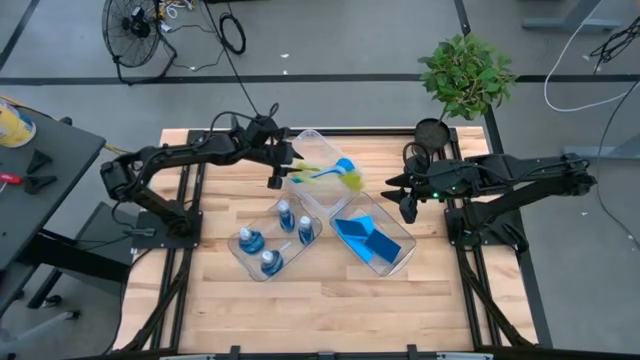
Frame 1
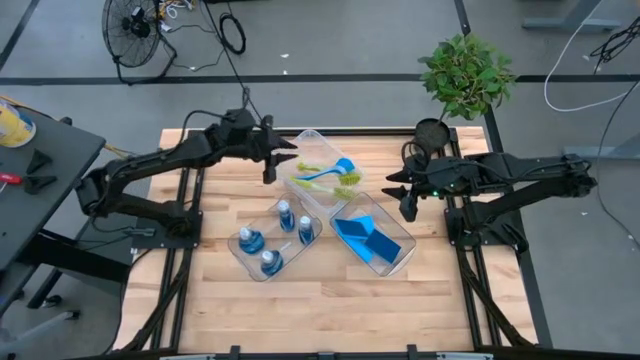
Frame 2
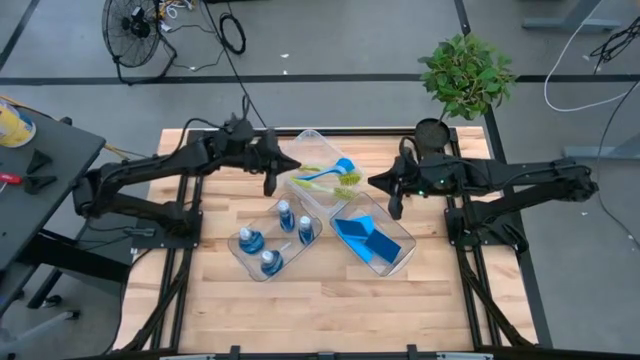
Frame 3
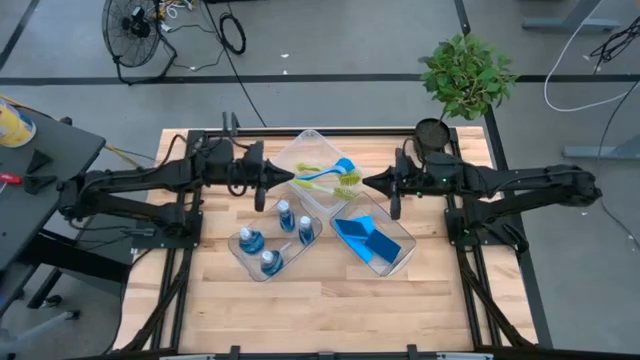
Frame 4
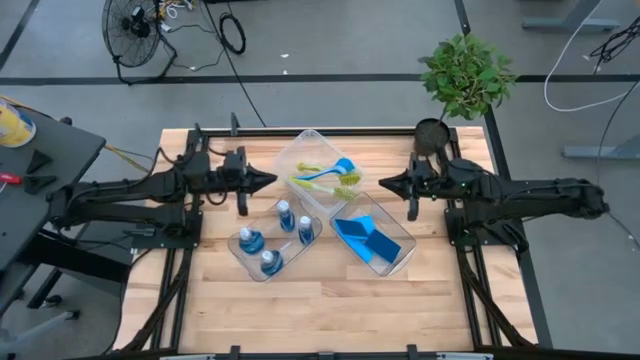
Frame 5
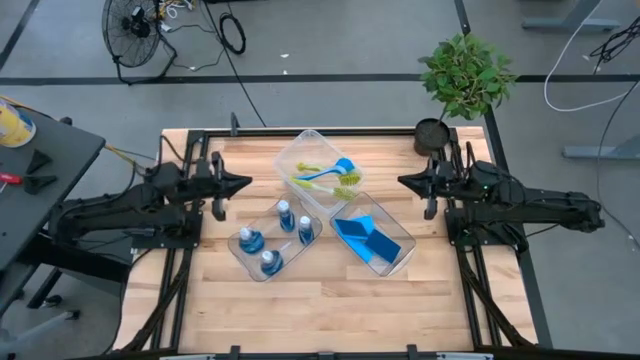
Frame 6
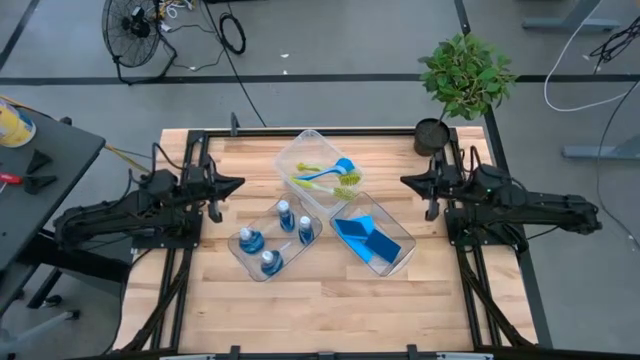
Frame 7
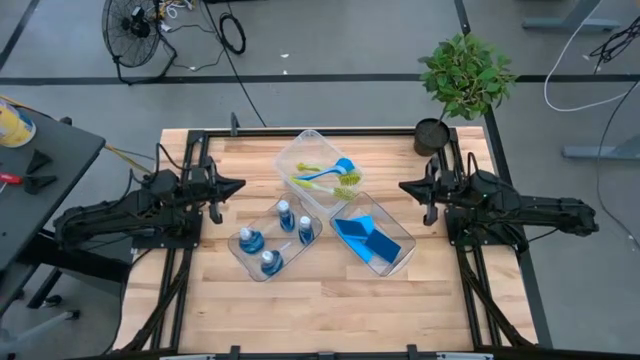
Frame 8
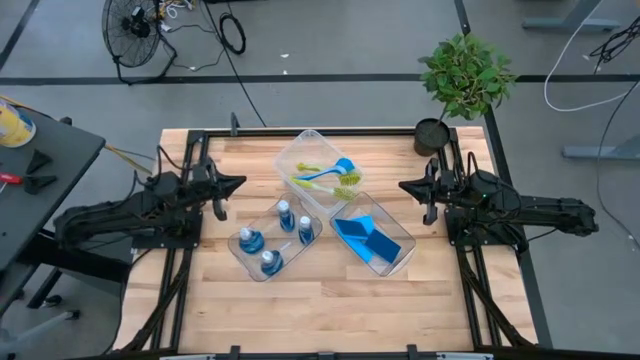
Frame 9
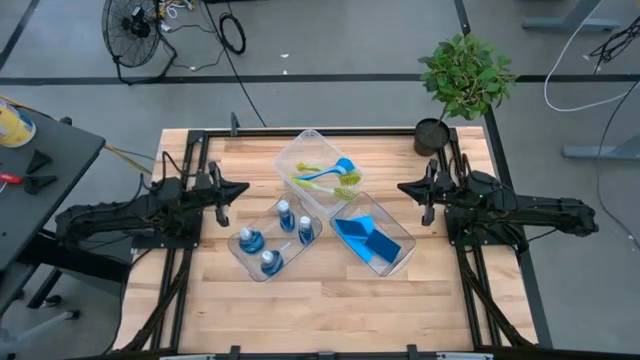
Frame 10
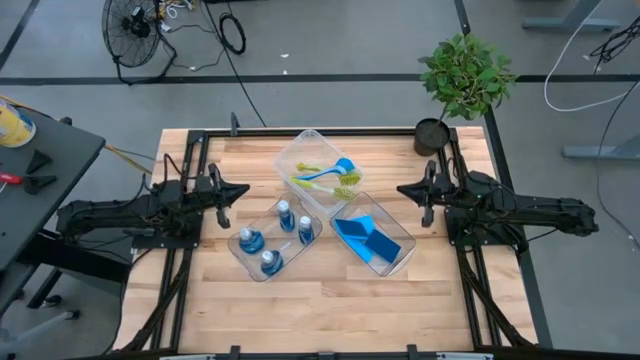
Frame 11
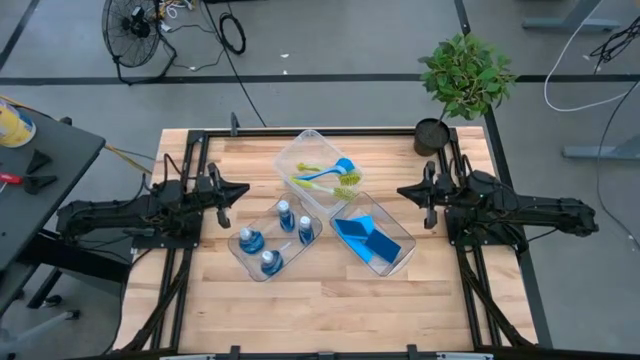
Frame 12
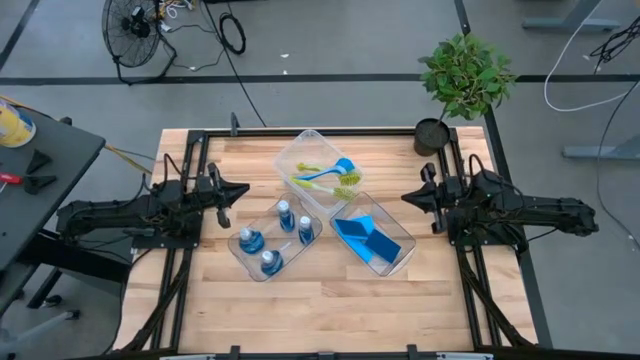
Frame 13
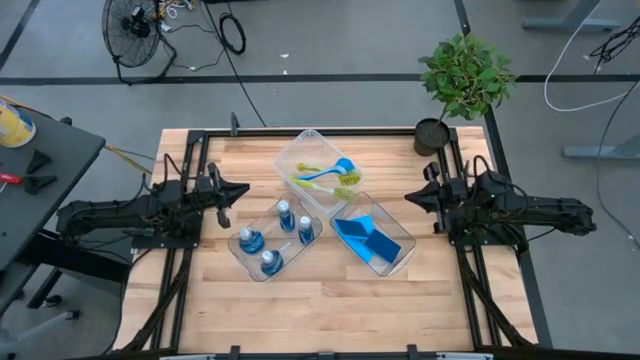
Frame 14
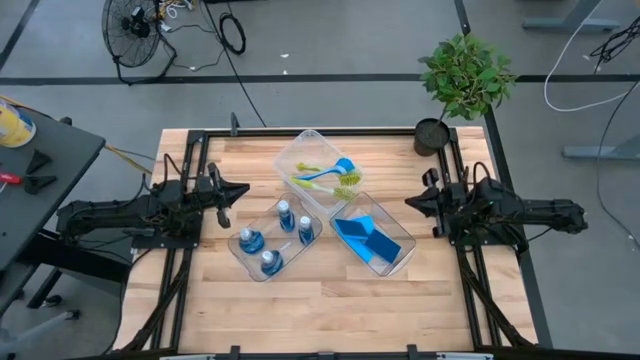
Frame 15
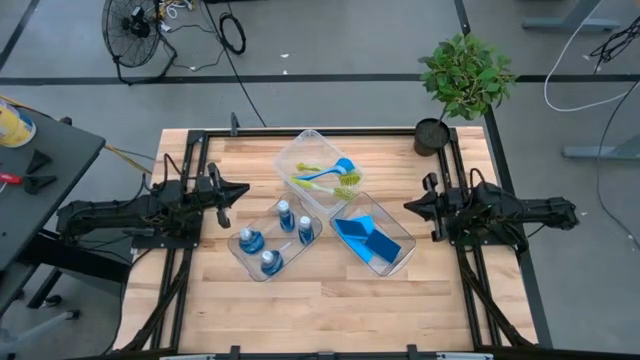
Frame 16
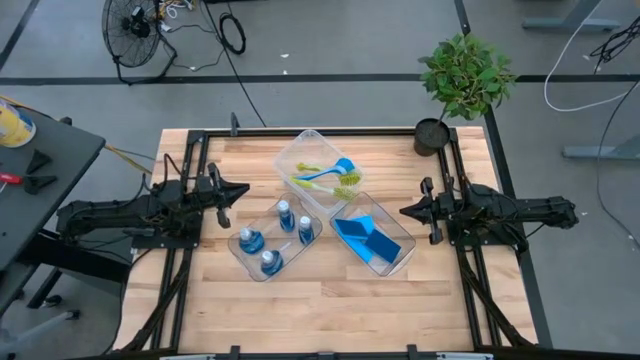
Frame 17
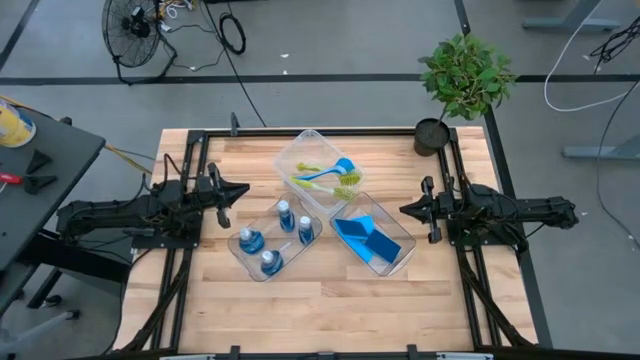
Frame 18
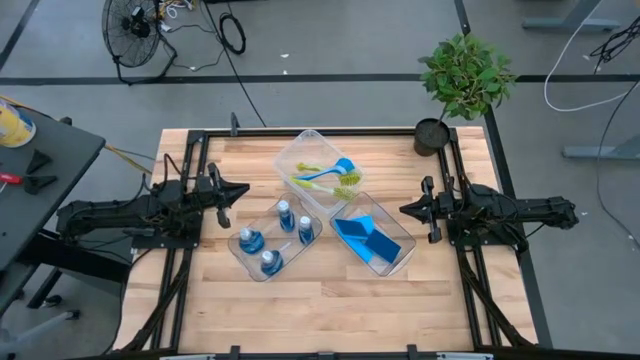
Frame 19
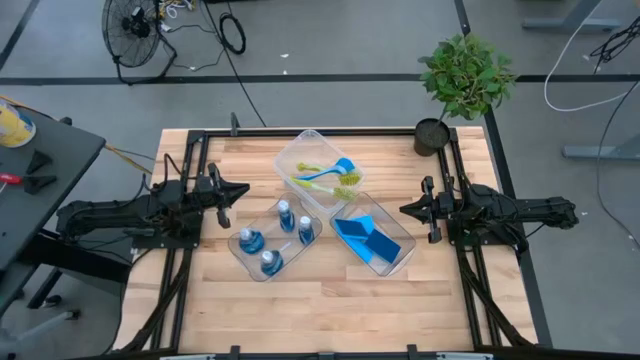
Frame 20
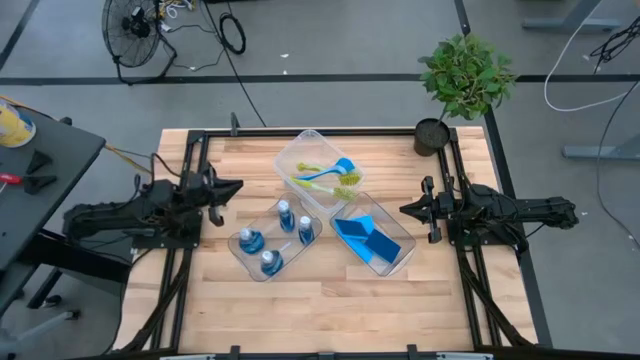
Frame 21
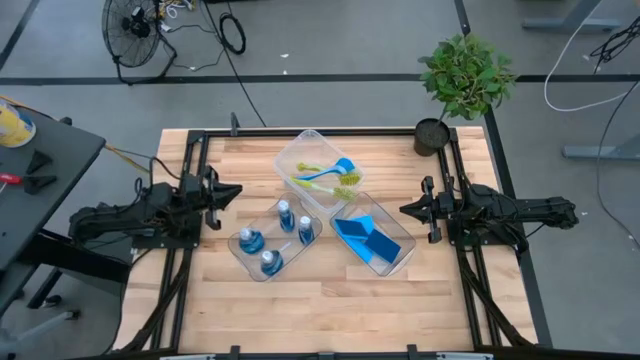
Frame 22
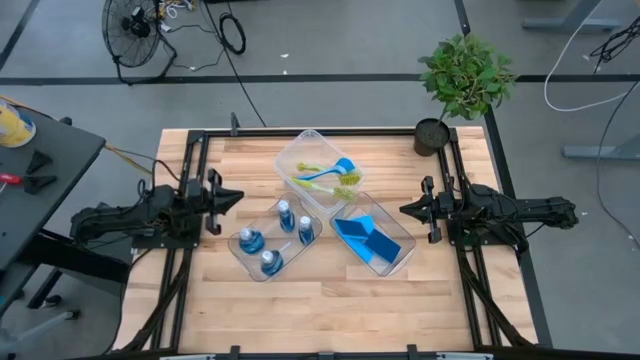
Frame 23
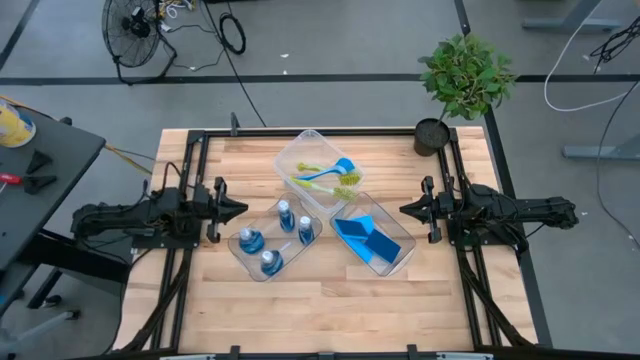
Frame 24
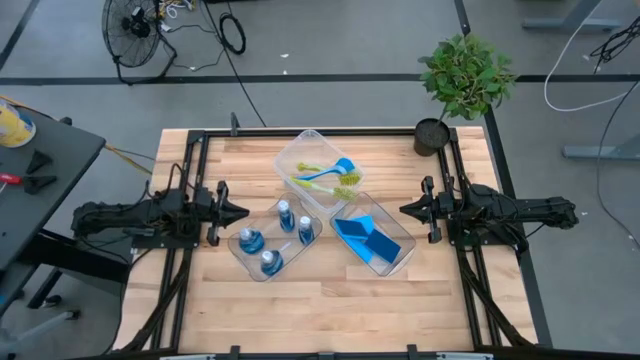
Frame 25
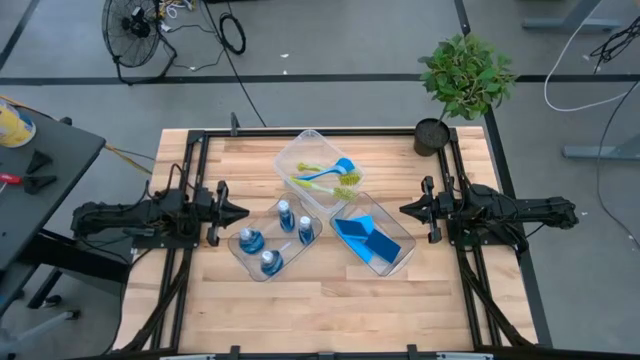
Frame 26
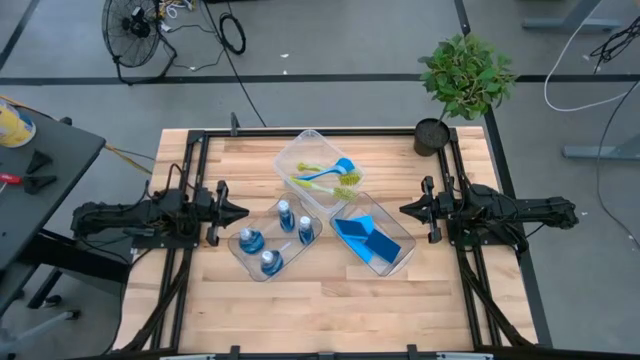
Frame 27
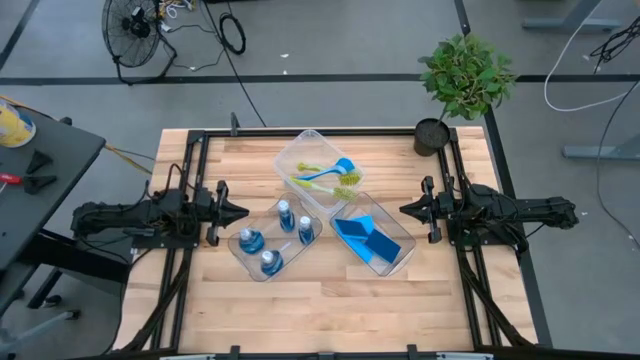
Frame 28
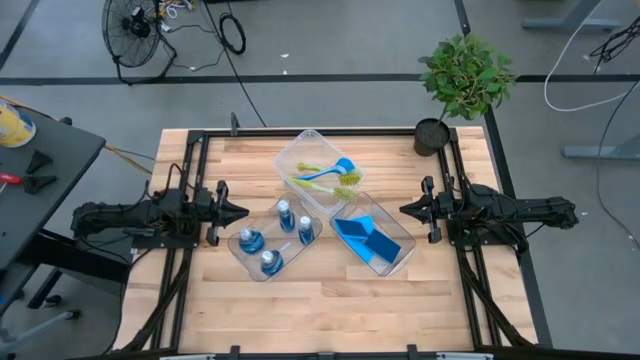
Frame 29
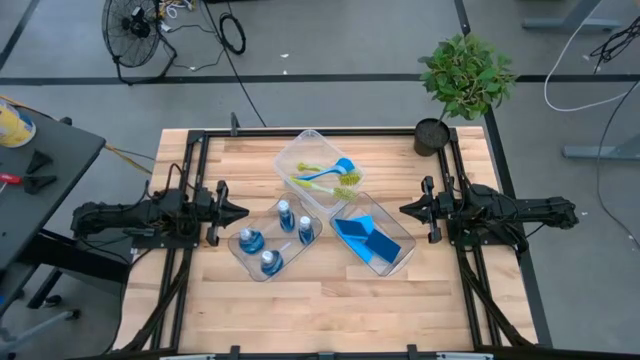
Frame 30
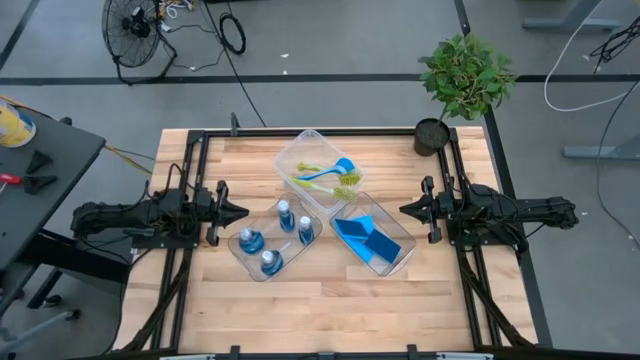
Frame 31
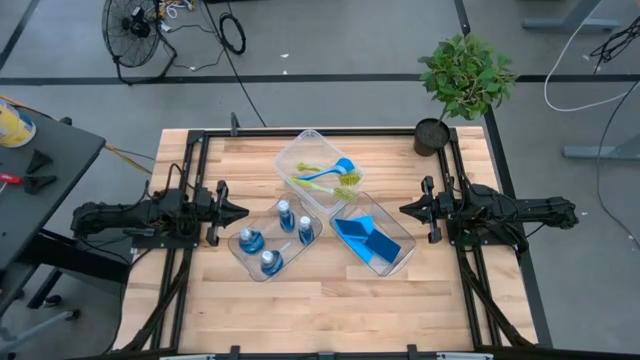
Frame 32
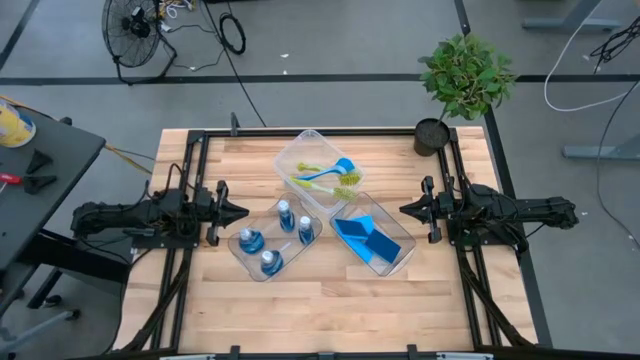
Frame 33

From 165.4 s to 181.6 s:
Task: Pick & Place Kitchen Sink Supplies
Return to Home Position

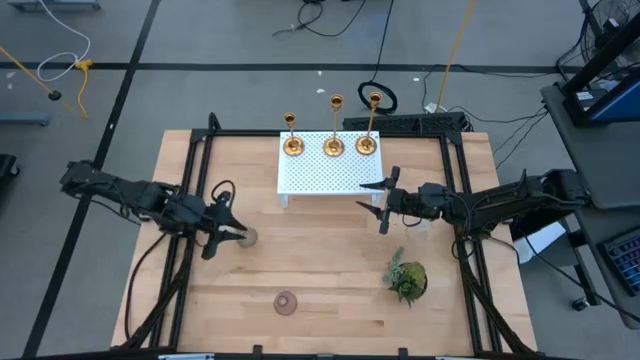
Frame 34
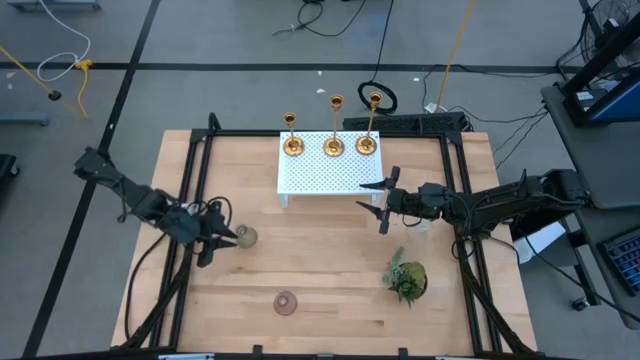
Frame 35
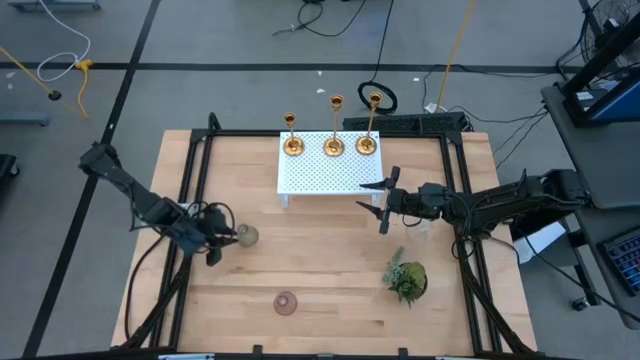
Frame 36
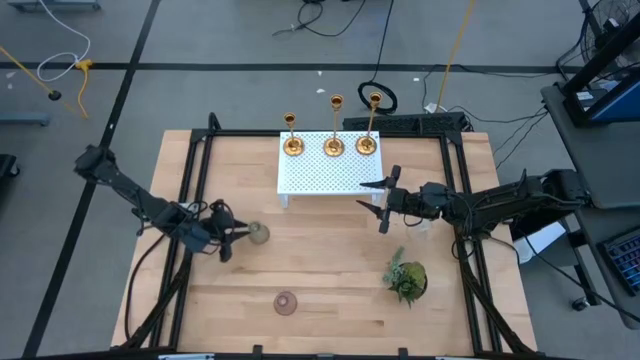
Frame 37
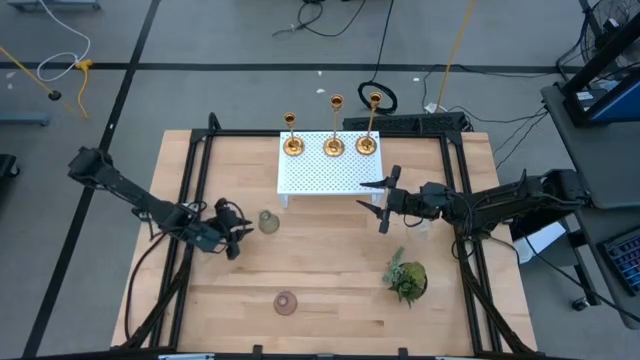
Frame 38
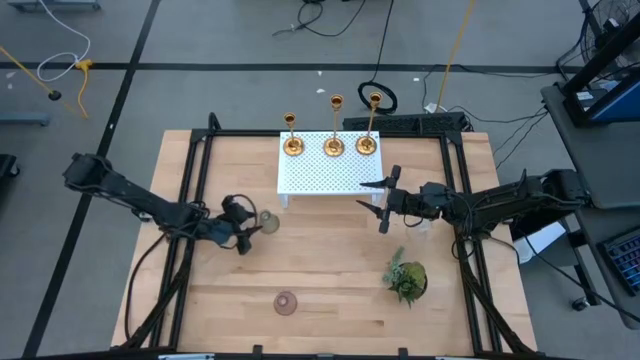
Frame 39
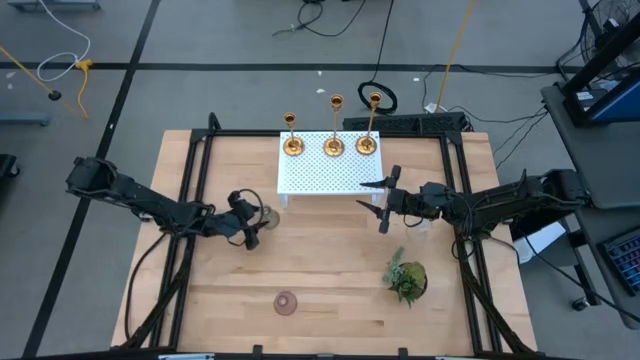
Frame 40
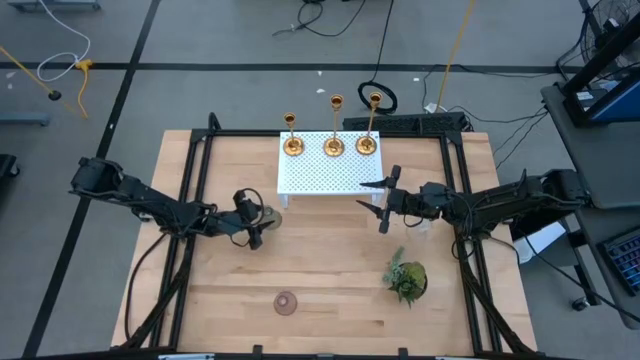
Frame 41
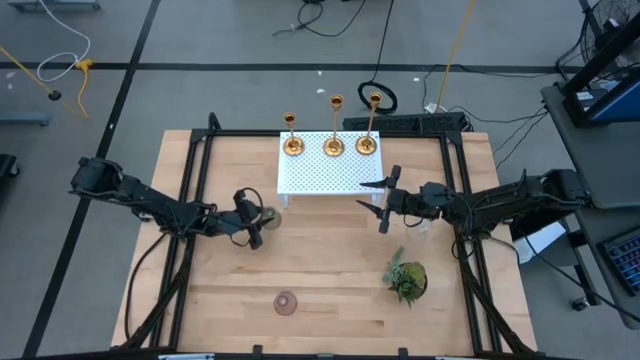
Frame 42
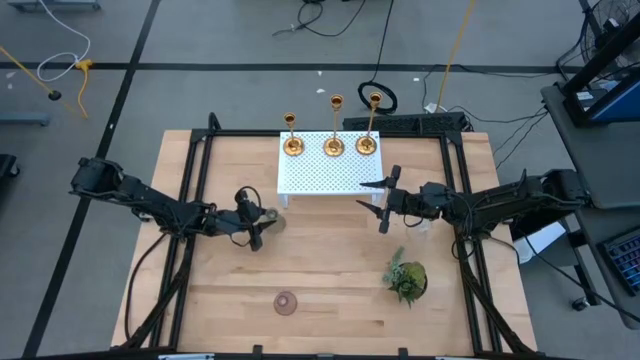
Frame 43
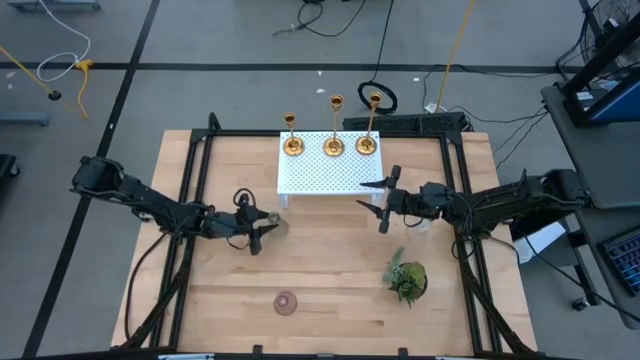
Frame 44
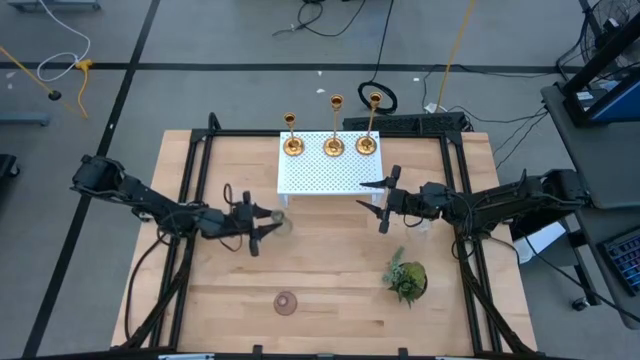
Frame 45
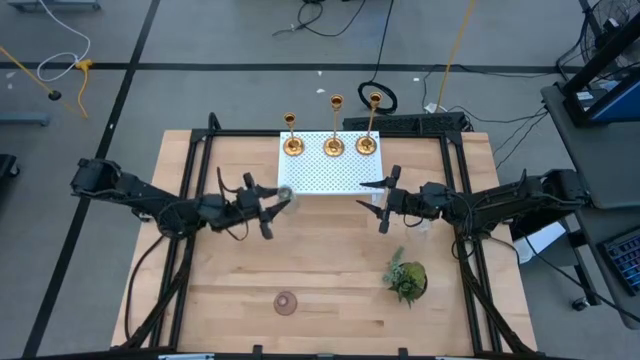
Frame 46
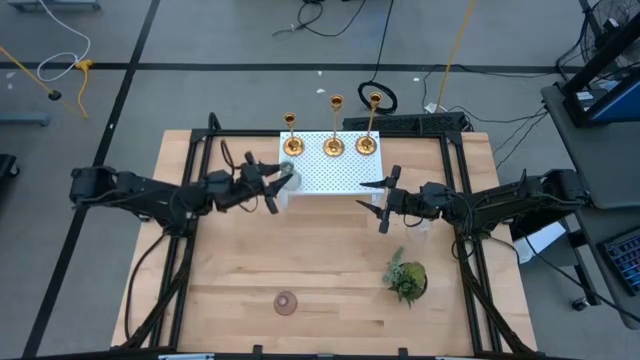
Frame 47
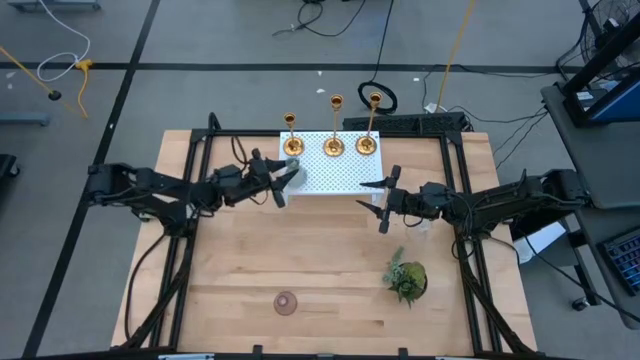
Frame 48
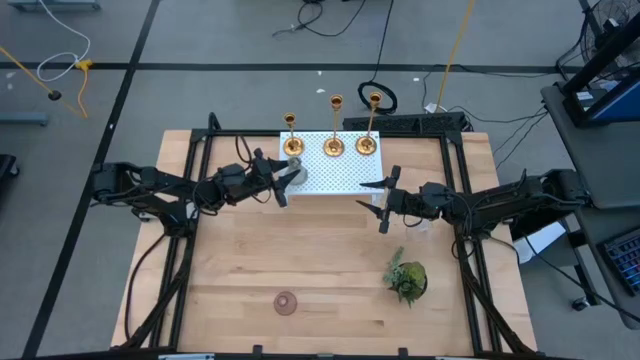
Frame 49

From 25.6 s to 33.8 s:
Task: Pick & Place candle stick holders
Put the gray candle holder on the shelf
